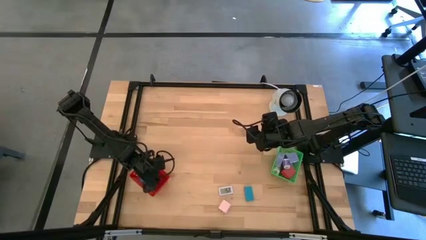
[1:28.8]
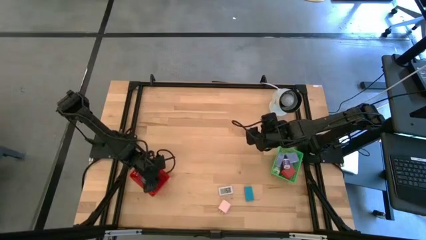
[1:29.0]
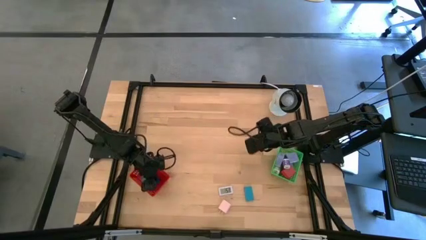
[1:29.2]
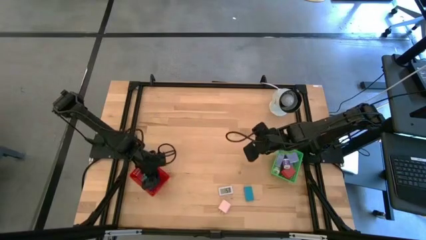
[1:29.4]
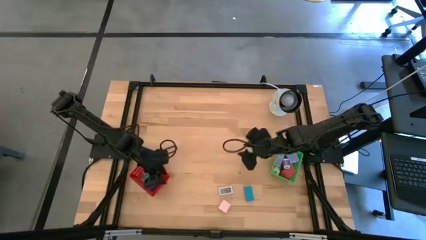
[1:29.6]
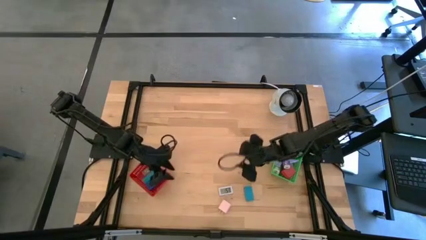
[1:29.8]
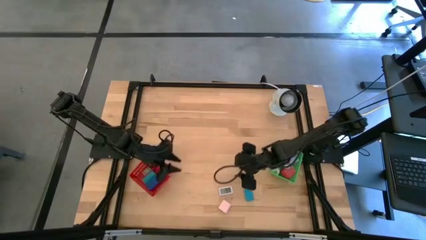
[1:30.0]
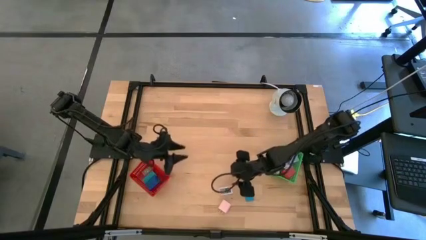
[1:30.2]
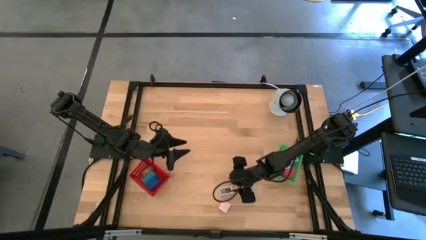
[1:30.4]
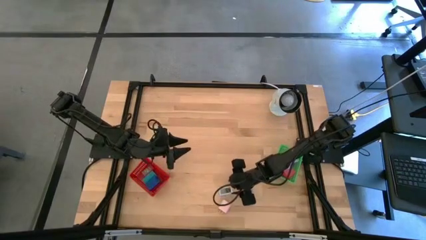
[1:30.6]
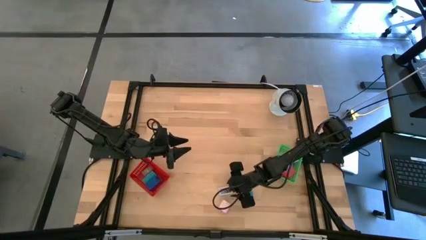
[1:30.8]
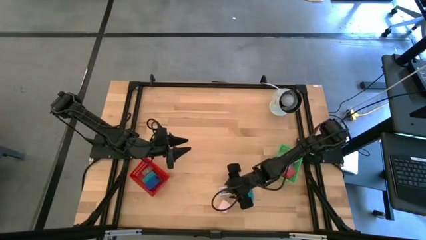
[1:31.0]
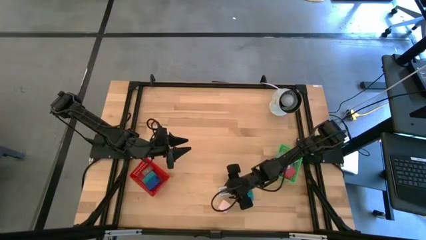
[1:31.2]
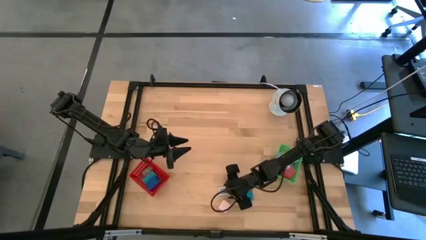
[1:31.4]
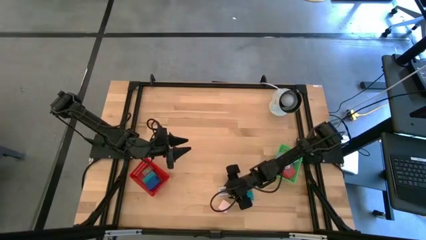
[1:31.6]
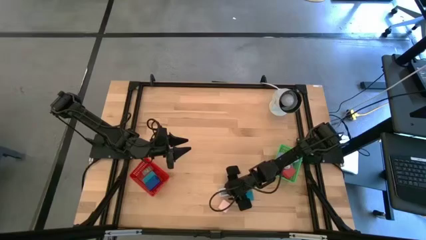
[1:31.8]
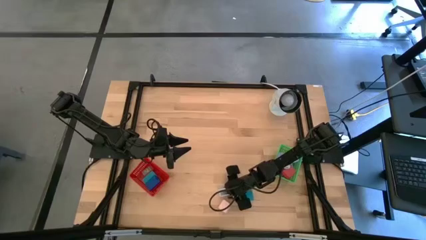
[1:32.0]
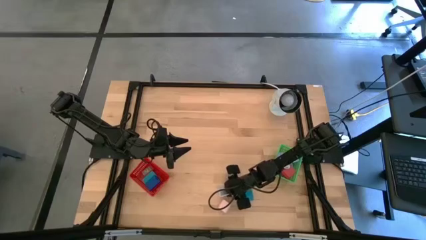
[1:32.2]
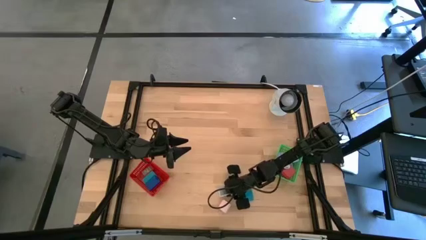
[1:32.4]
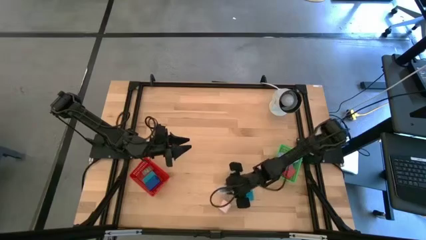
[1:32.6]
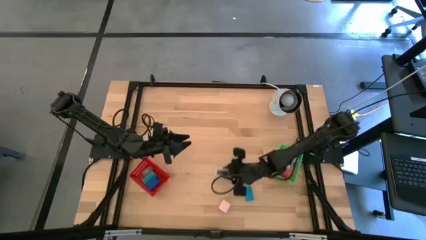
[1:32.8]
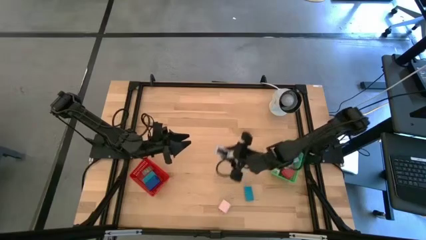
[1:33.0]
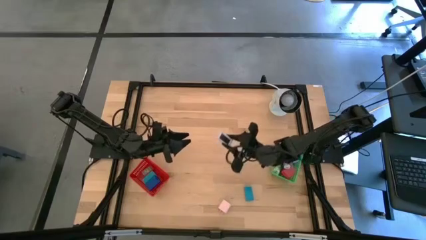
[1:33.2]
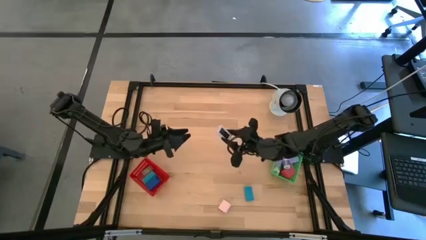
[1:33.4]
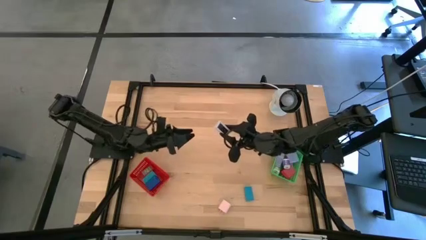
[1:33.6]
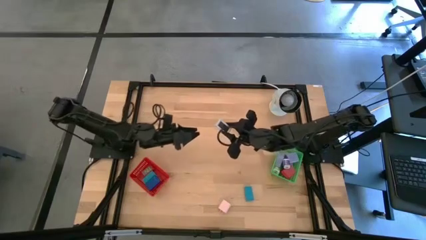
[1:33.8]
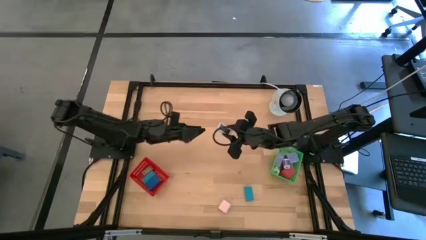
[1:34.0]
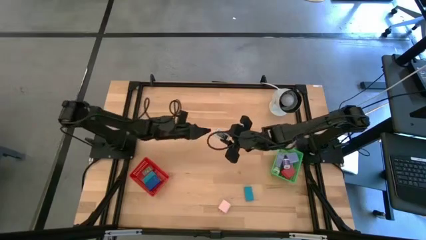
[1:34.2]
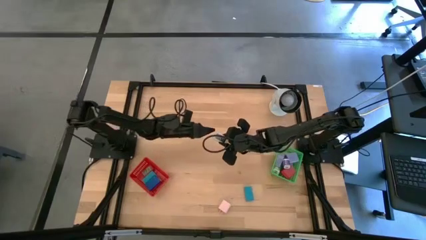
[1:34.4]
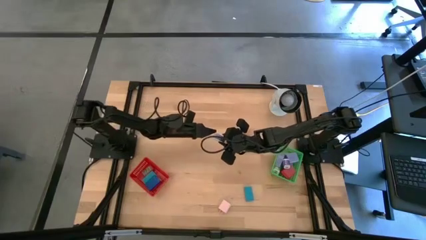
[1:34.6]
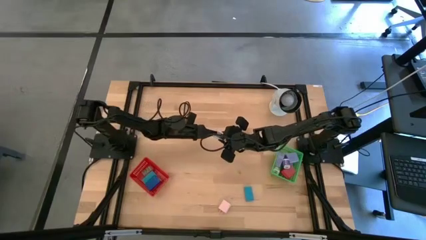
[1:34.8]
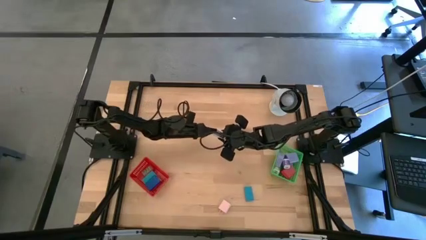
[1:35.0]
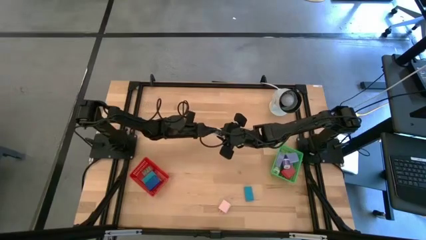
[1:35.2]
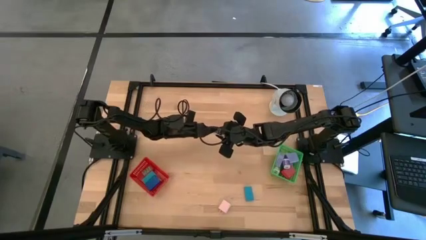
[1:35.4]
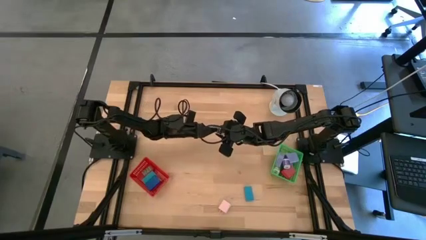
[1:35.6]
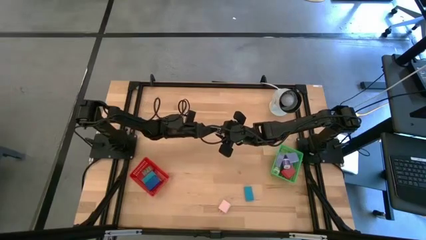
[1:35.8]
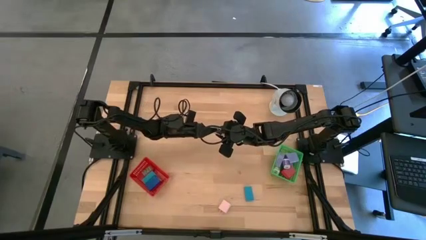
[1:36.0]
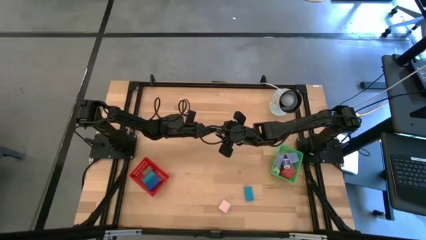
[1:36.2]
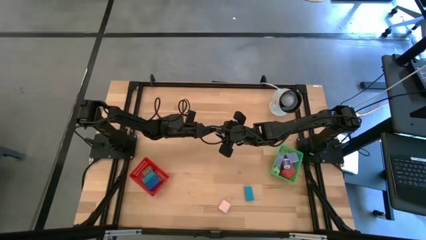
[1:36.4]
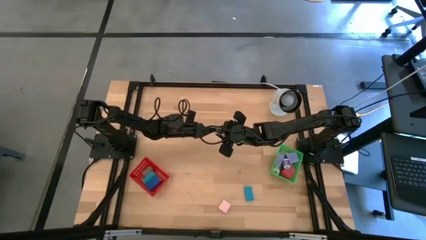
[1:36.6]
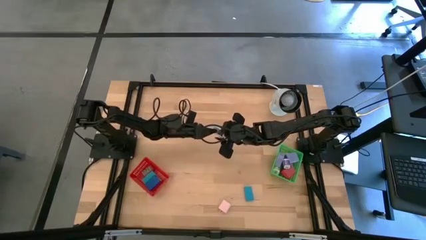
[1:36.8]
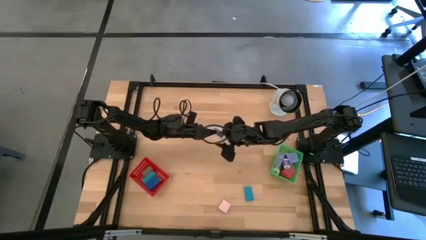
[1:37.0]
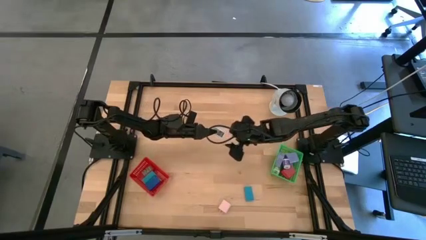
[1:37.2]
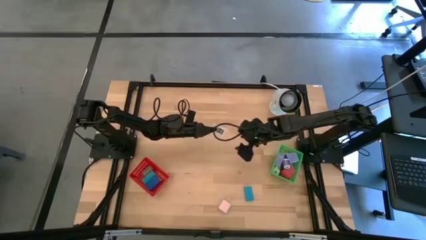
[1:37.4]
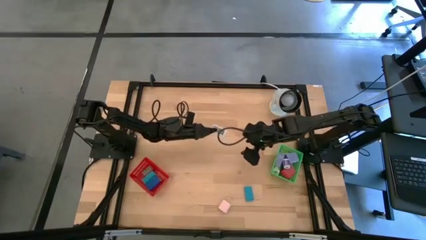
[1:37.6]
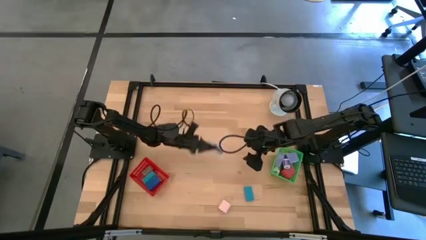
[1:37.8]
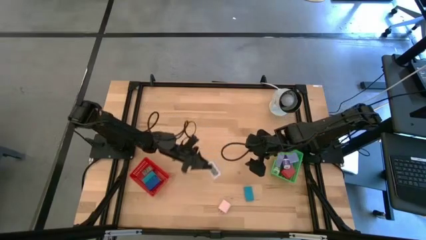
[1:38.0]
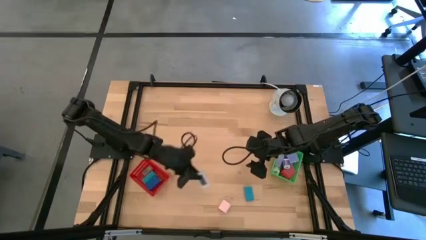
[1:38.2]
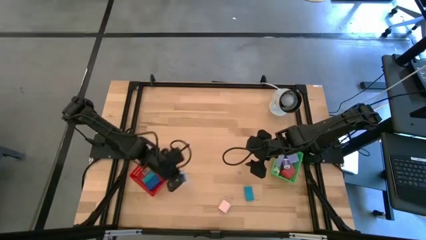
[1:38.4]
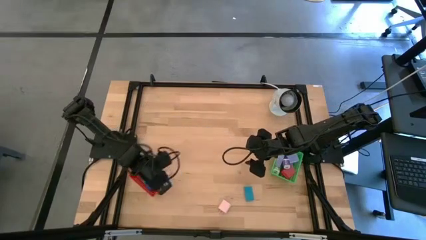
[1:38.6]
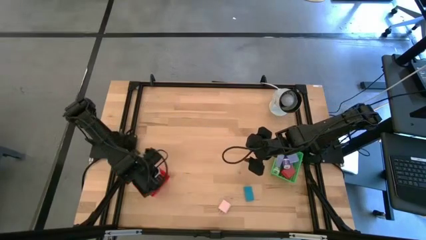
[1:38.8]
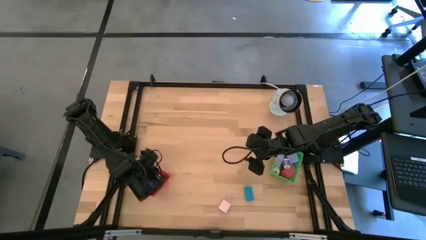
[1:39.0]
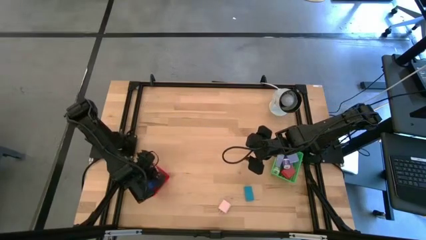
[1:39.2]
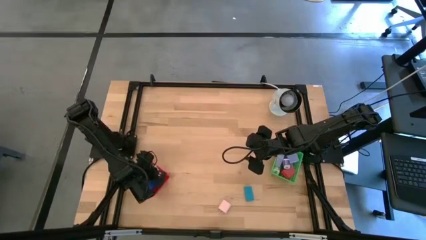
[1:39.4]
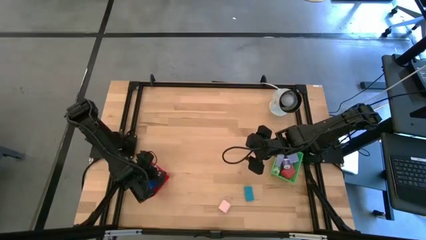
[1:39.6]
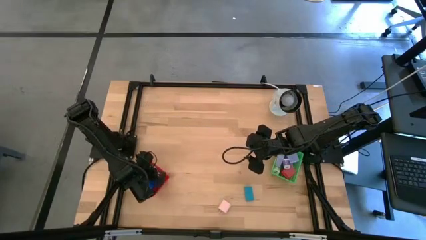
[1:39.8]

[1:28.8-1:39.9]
Task: Pick & Place Office items
Put the white digital clock into the red bin

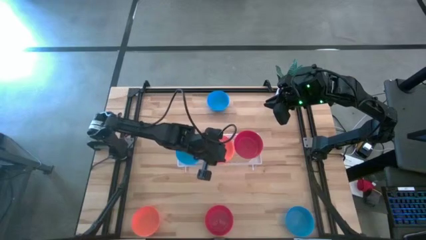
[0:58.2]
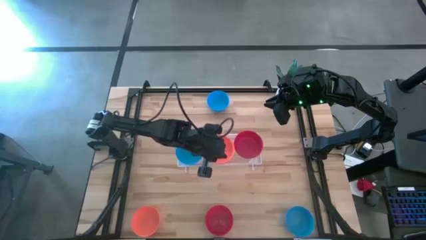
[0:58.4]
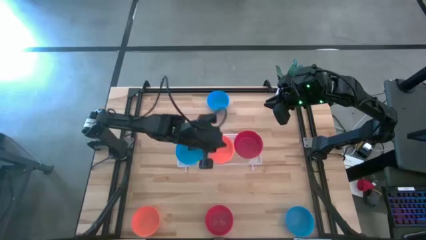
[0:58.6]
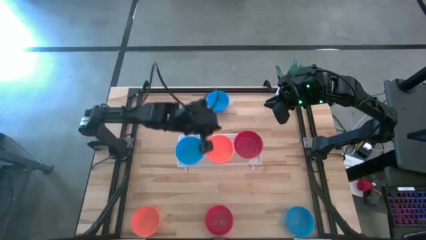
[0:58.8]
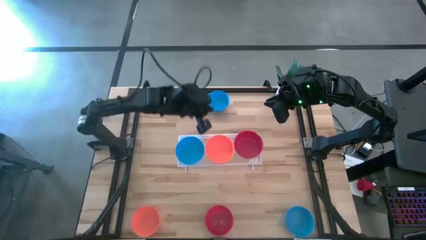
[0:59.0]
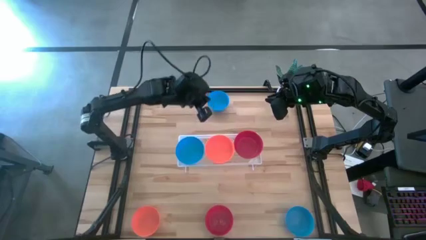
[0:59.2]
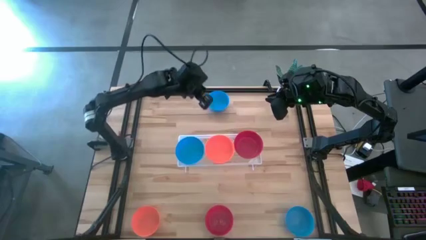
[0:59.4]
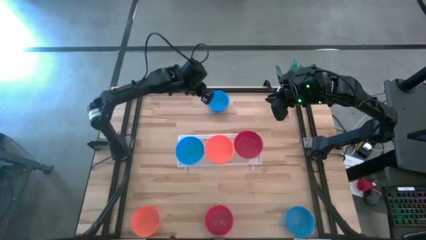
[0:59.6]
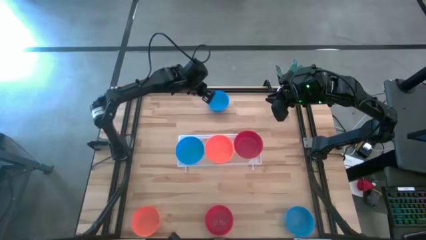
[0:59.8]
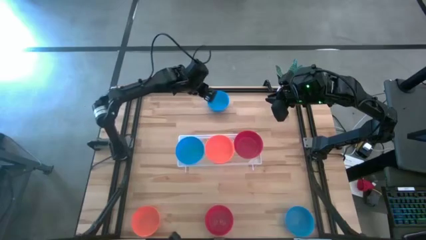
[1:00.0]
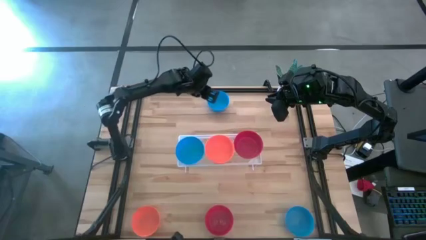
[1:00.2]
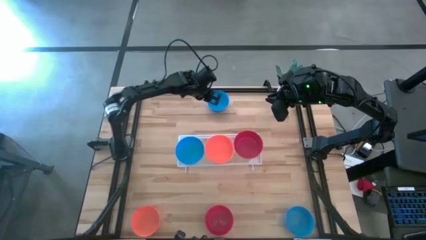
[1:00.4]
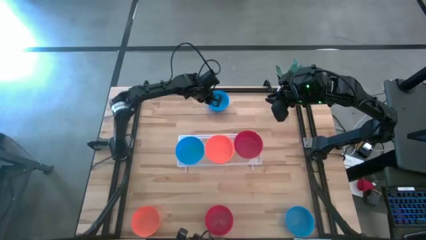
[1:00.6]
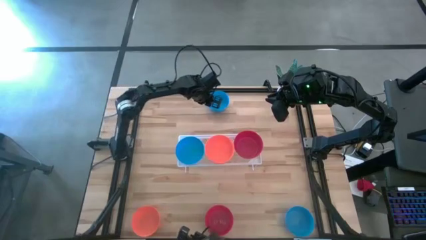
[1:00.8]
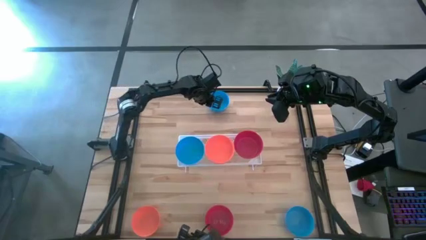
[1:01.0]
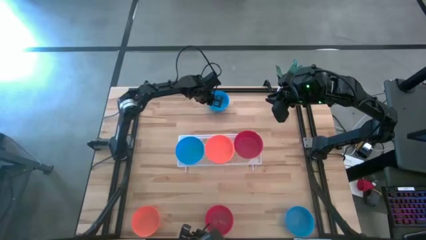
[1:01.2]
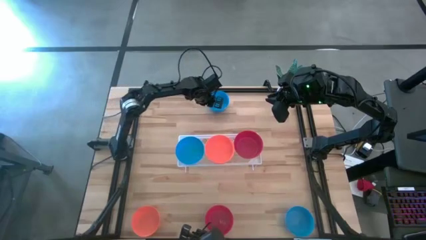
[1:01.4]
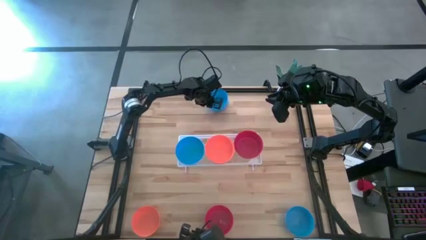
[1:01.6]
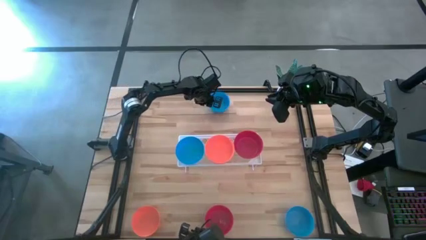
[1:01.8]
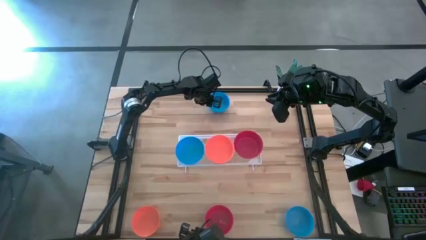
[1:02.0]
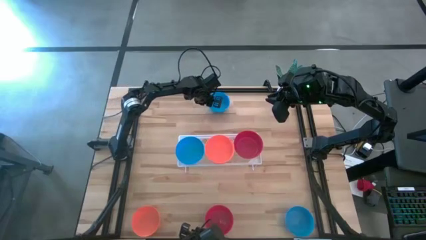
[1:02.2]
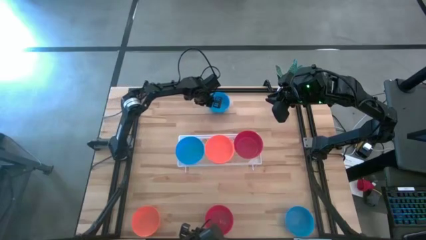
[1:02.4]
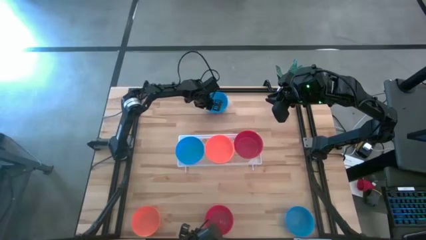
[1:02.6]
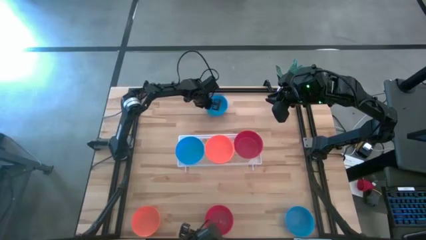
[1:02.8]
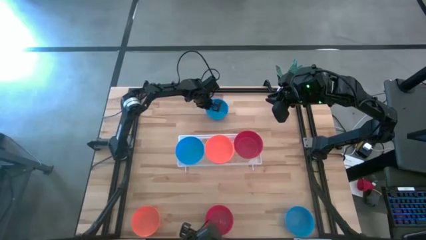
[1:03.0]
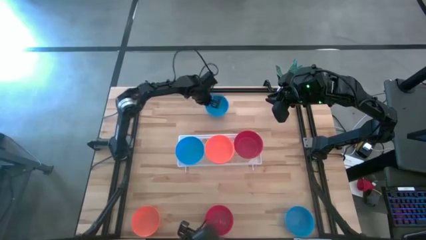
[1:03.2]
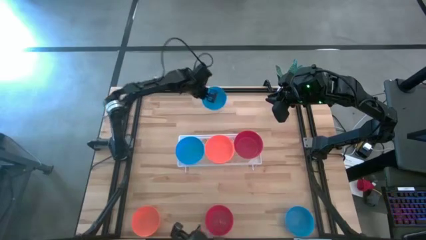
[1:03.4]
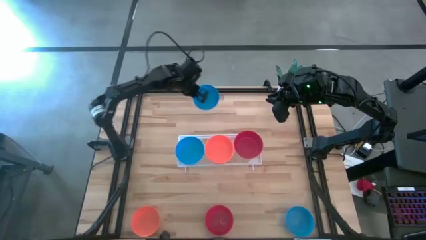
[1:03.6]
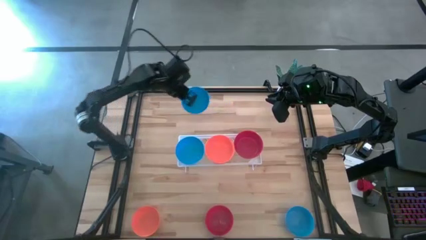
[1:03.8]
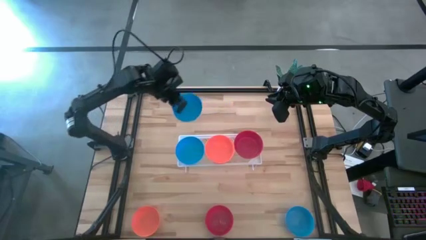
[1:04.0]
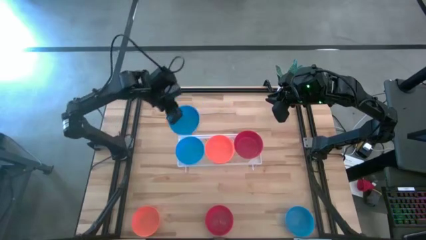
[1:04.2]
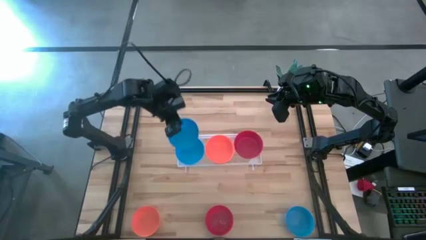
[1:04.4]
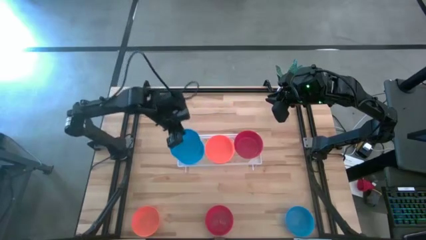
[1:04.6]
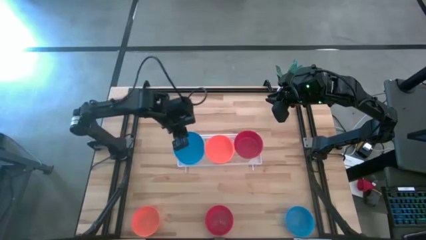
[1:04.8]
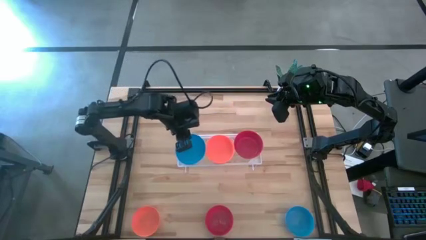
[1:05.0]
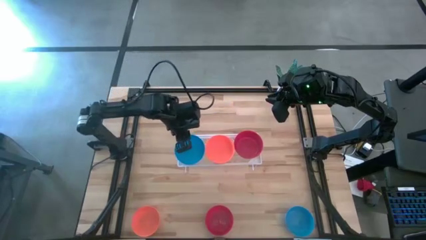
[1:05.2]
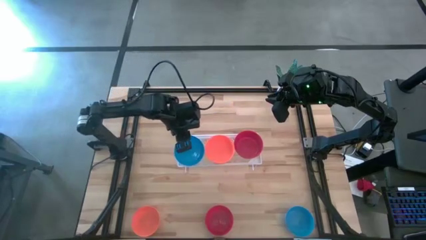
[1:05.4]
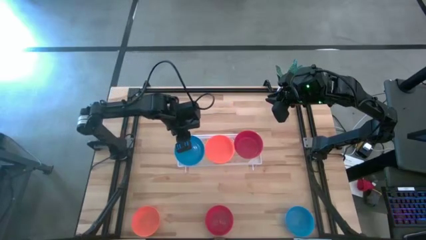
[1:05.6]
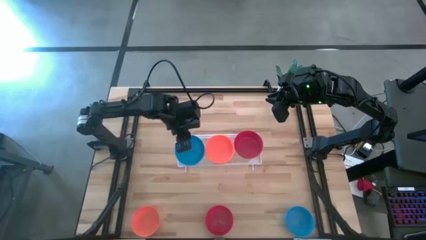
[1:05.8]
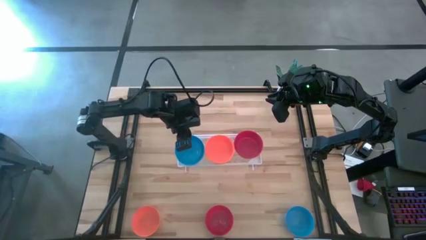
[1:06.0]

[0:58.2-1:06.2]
Task: Pick & Place Mini bowls
Stack the top blue bowl on the blue bowl on the shelf
